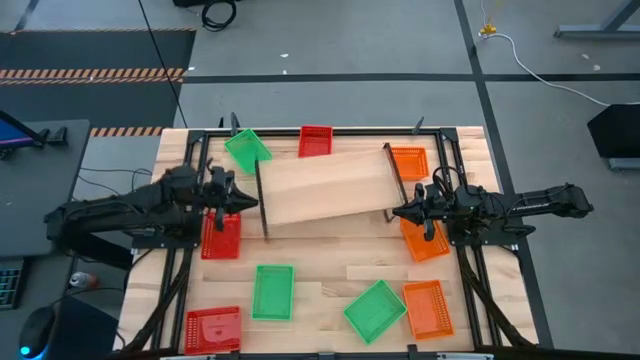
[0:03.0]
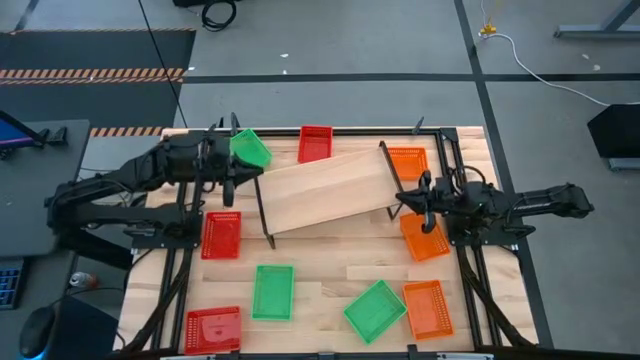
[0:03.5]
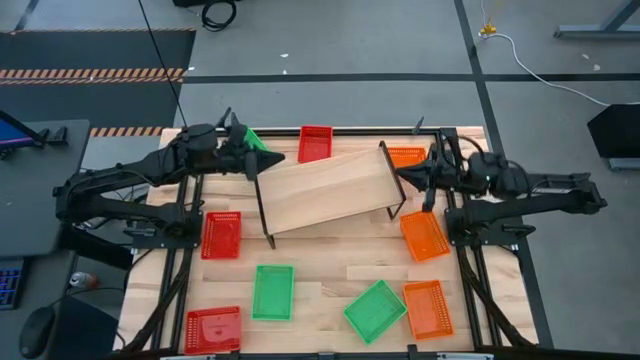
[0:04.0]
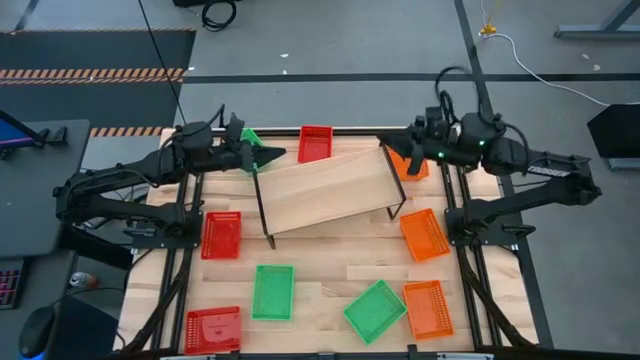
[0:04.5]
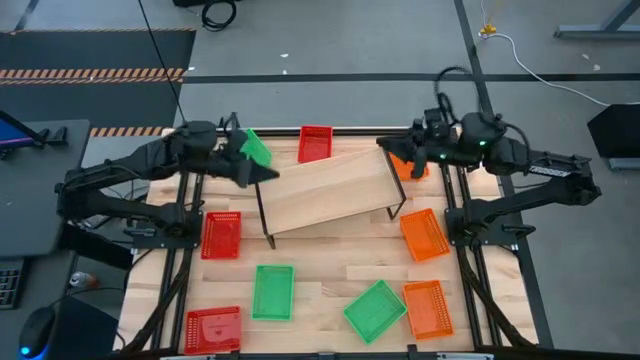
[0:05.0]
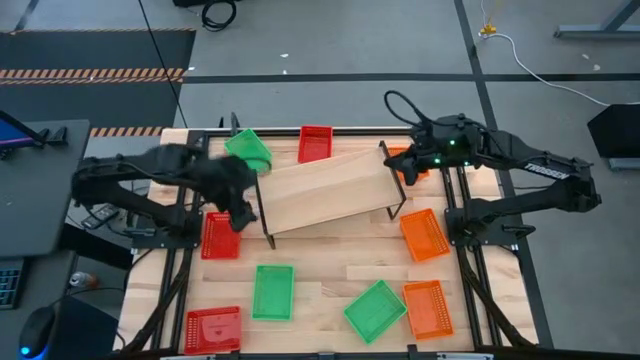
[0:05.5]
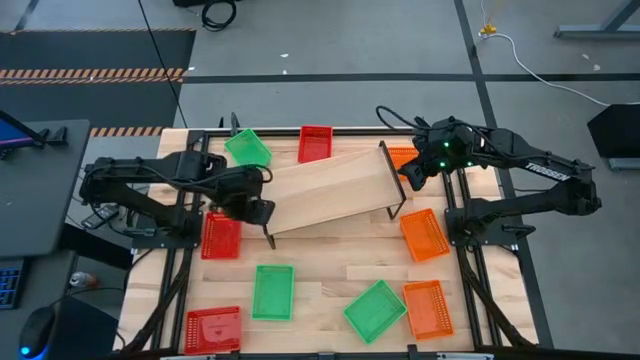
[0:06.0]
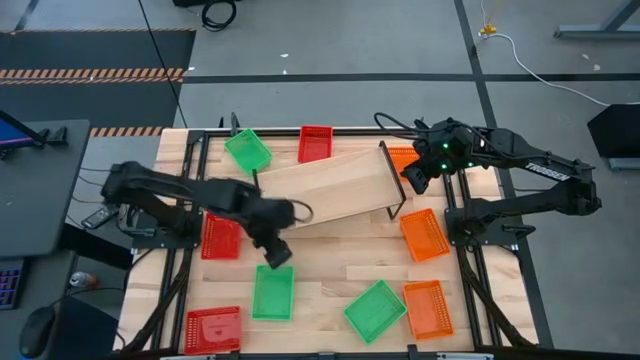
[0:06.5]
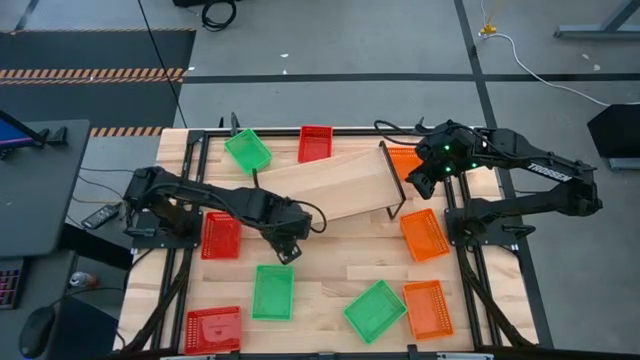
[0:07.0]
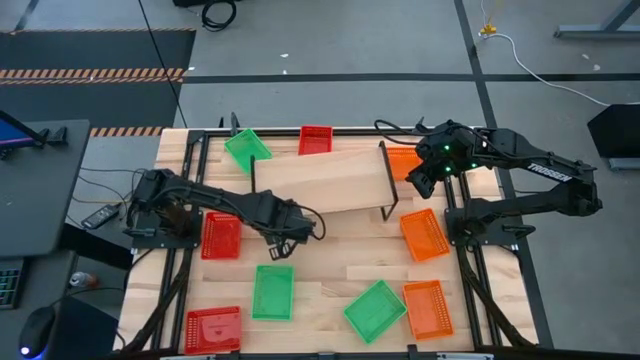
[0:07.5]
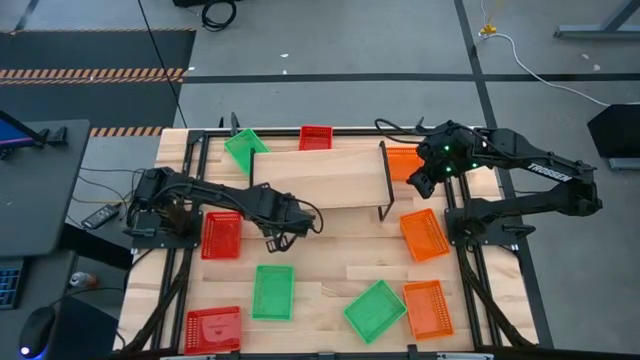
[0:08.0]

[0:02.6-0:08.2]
Task: Stack baskets on shelf by color
Adjust the shelf

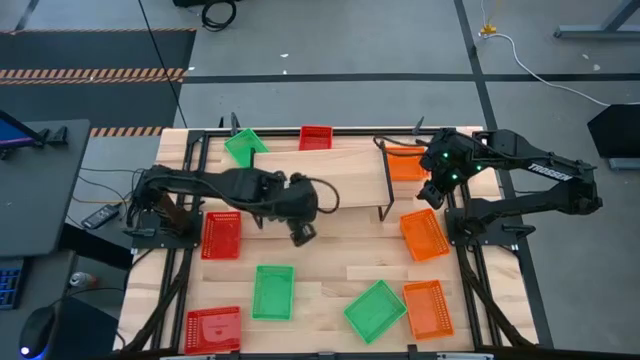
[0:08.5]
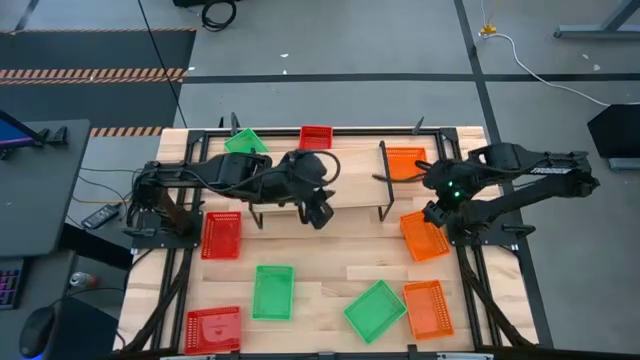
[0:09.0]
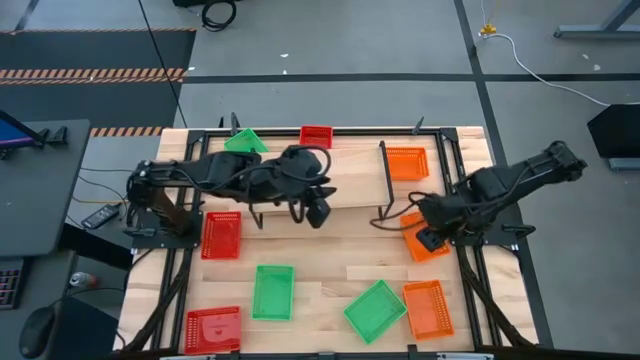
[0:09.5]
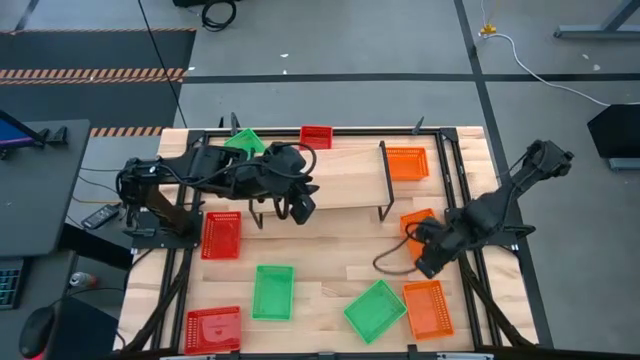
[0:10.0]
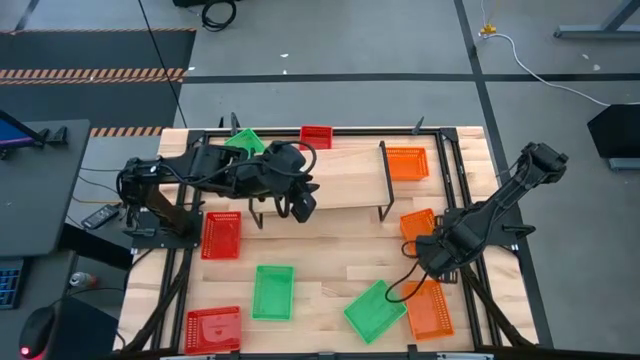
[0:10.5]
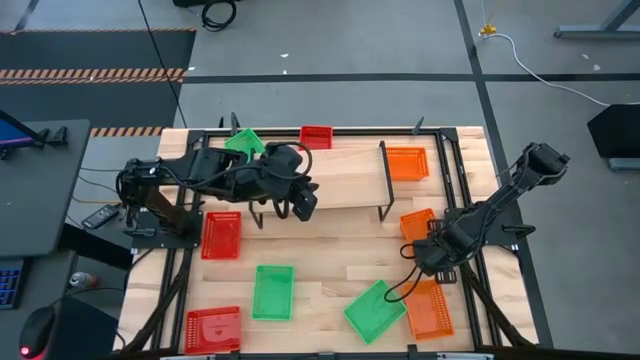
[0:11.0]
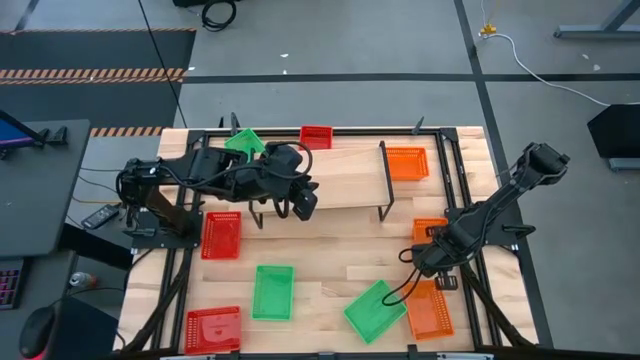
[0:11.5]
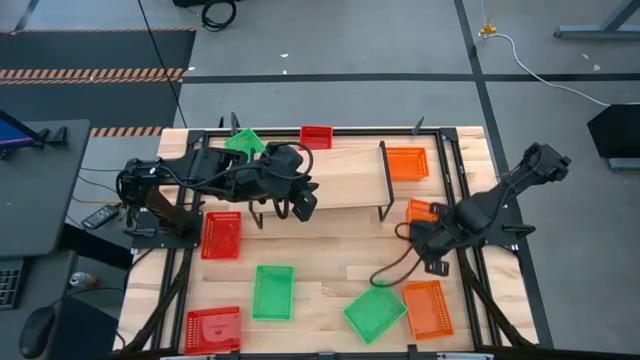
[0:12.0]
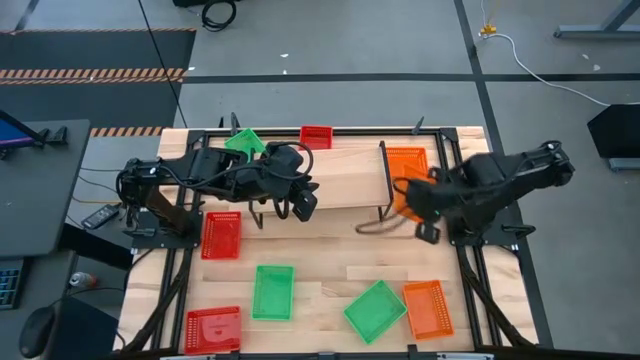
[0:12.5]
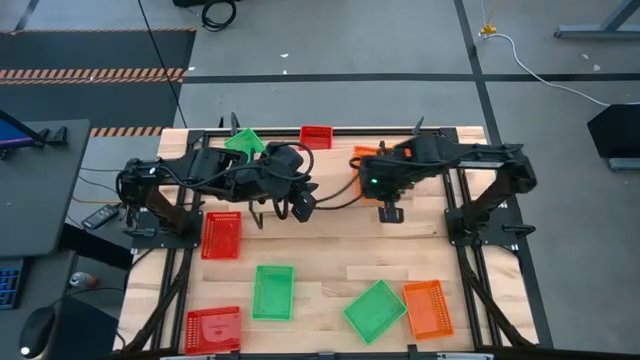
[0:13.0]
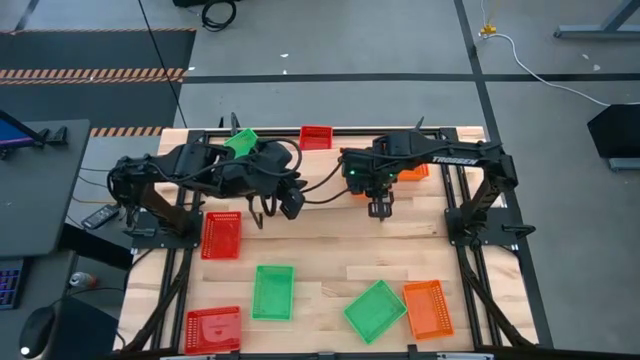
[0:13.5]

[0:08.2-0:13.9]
Put the middle orange bin into the shelf

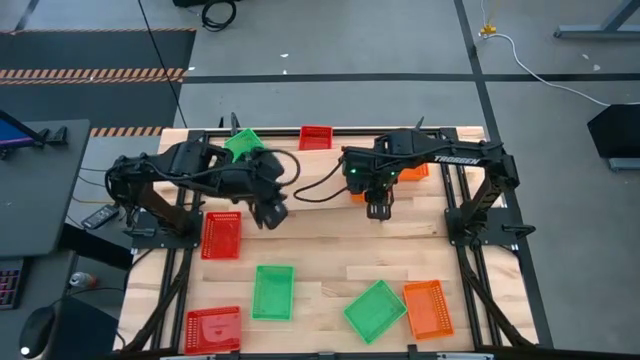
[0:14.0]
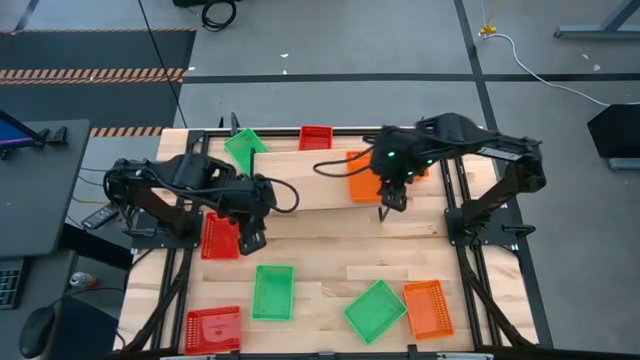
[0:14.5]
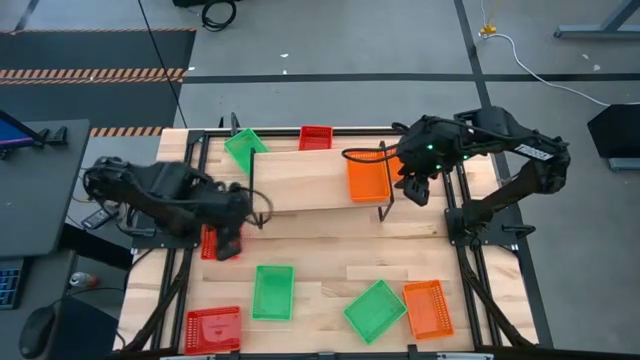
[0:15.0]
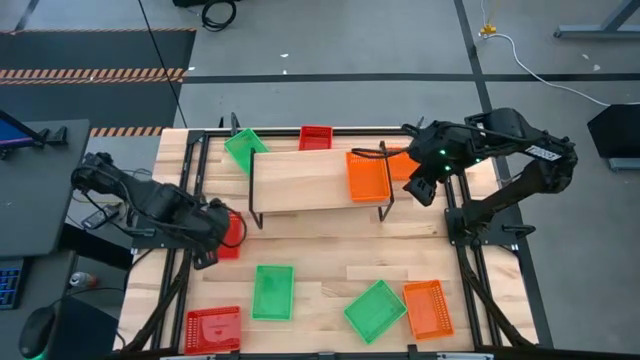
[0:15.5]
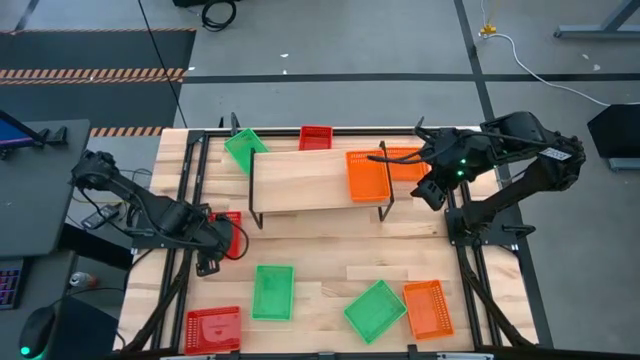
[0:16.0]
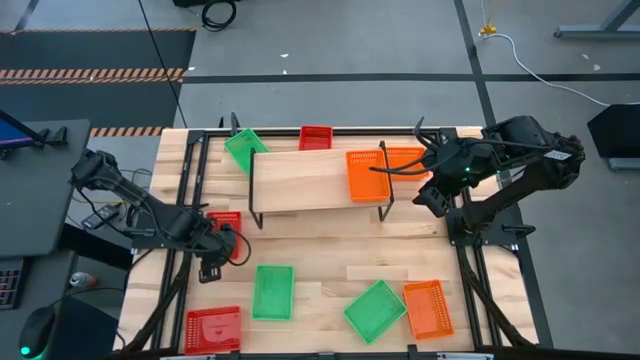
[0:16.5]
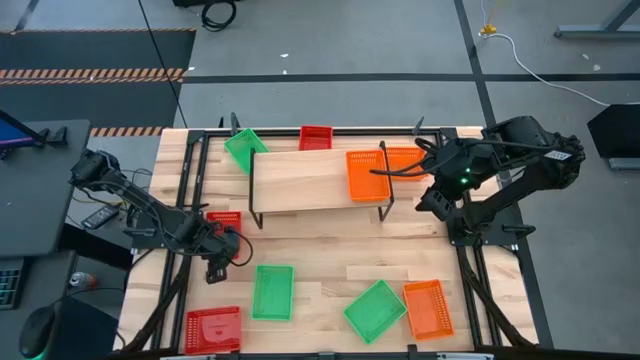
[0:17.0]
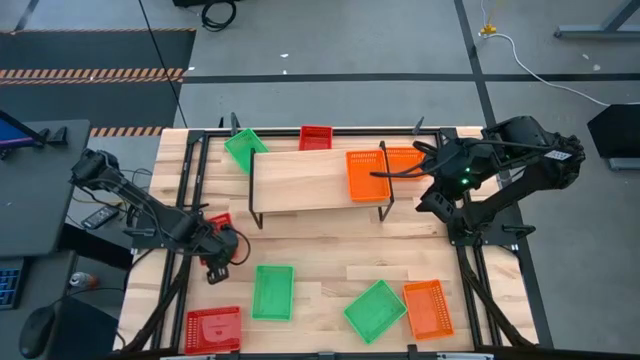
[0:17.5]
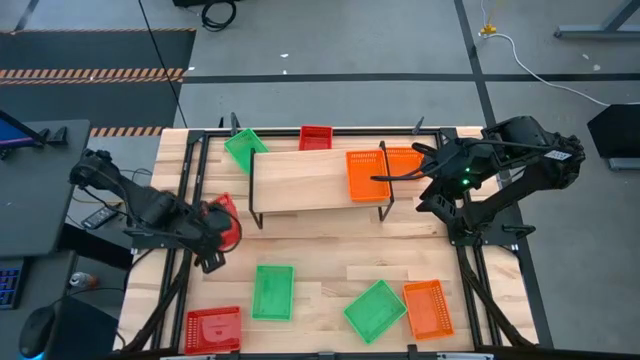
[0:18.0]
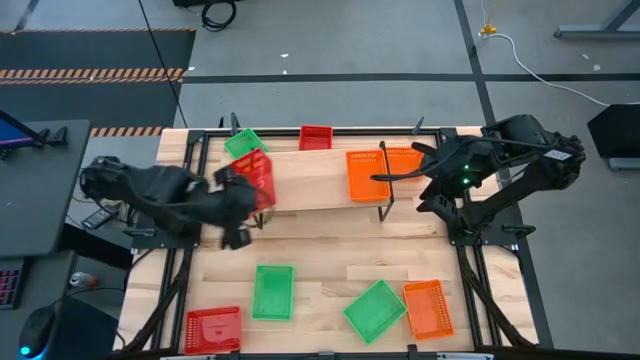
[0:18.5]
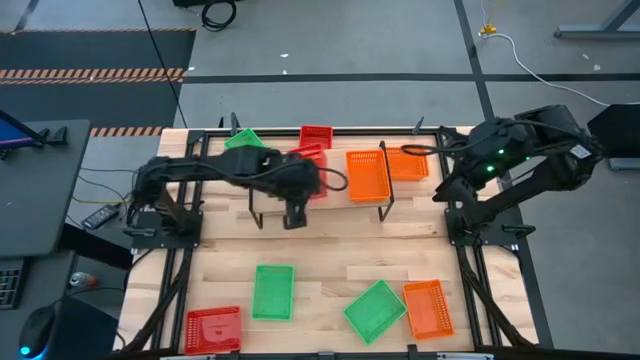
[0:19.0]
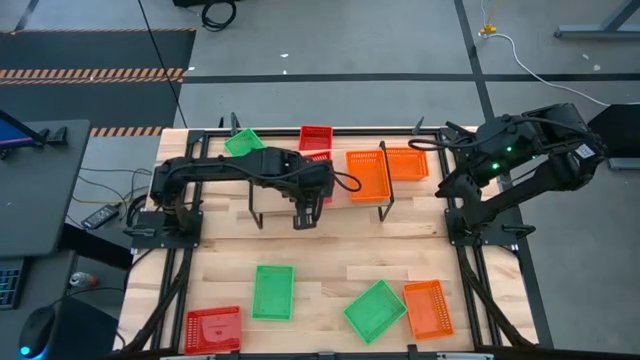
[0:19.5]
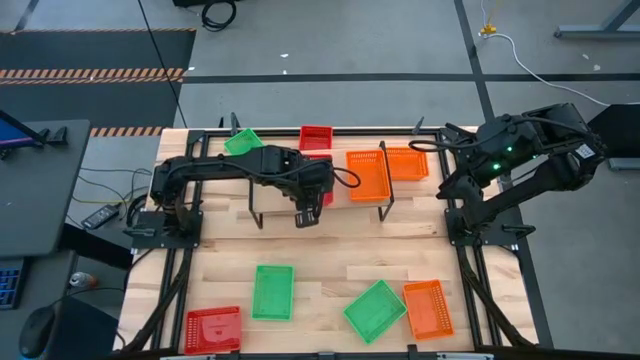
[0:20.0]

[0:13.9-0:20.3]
Put the middle red bin into the shelf

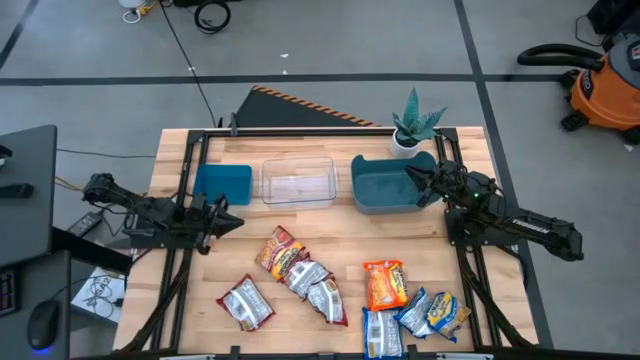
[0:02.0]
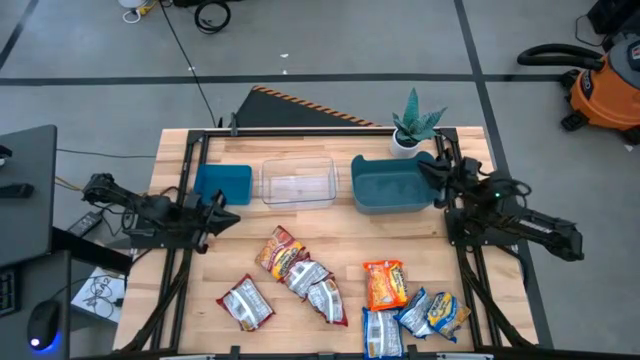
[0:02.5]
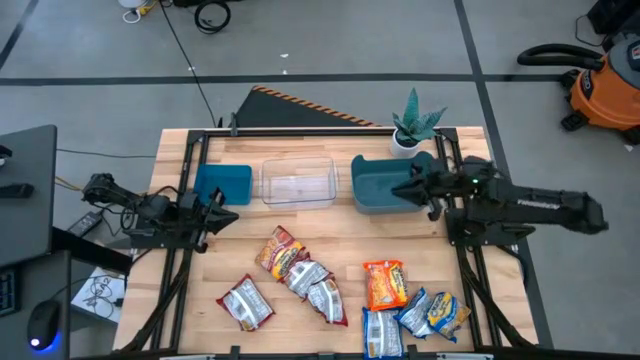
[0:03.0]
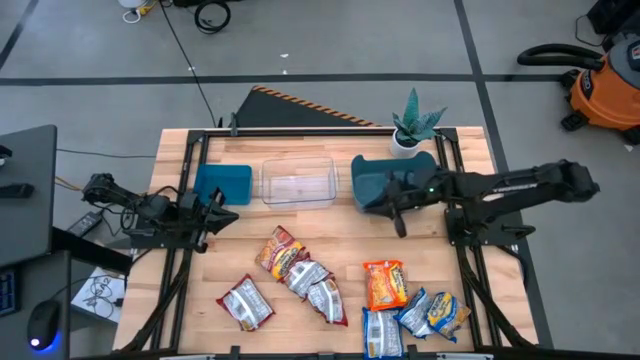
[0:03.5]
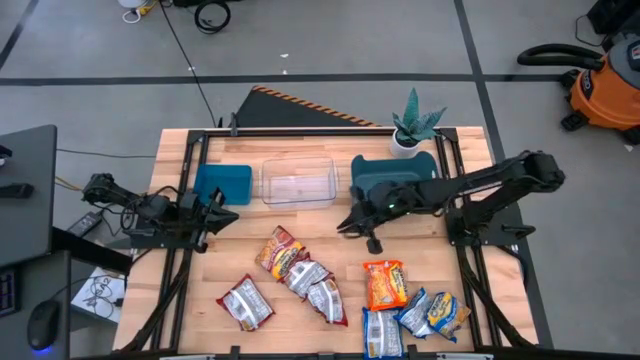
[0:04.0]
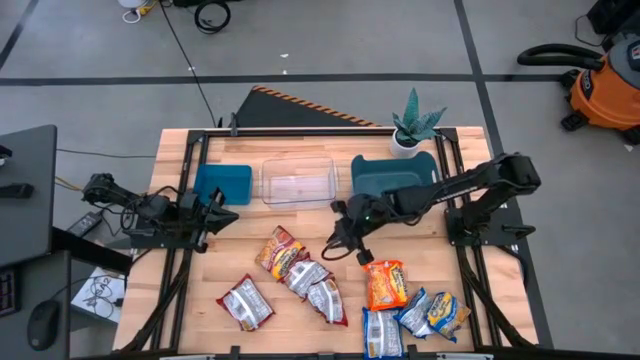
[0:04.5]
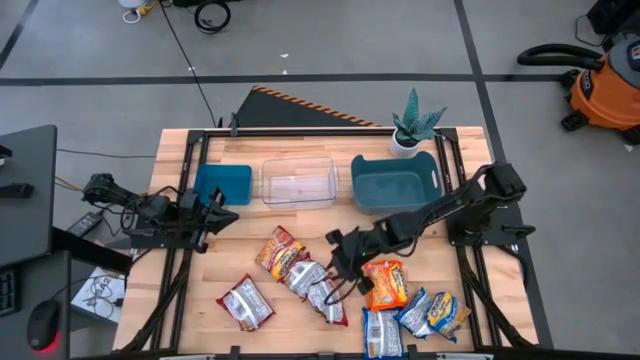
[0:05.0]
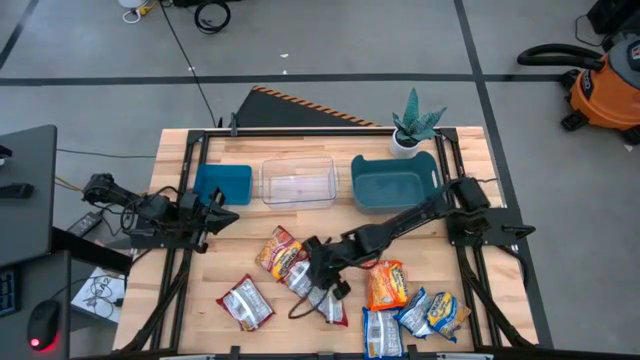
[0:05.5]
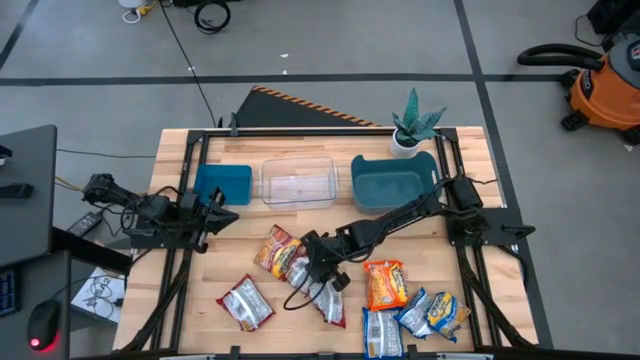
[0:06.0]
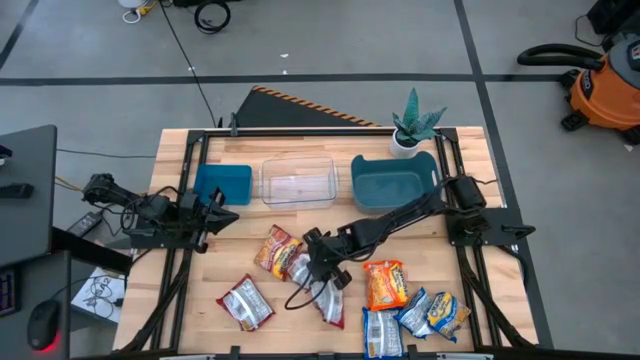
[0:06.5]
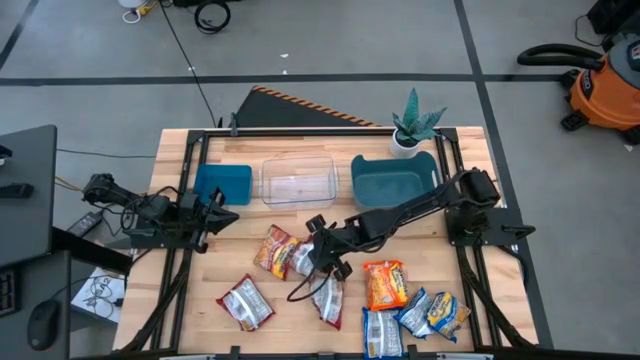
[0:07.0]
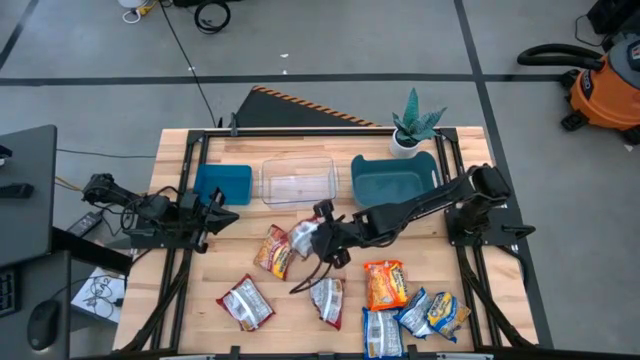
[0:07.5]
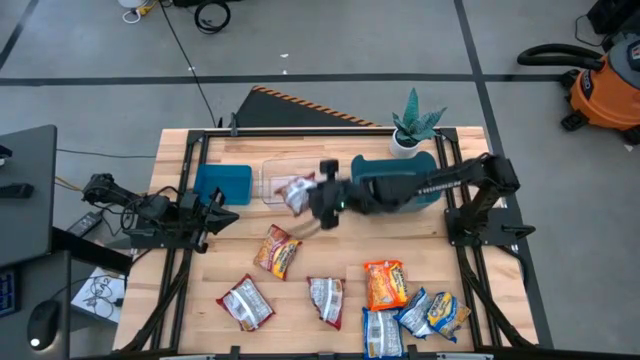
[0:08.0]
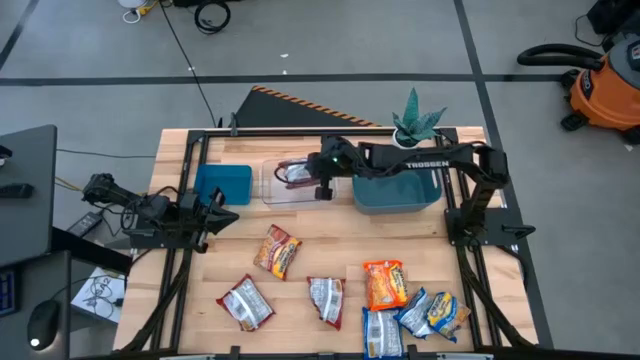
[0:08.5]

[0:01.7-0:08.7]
Task: Sort Maruchan noodles
Put the red noodle pack into the transparent bin
